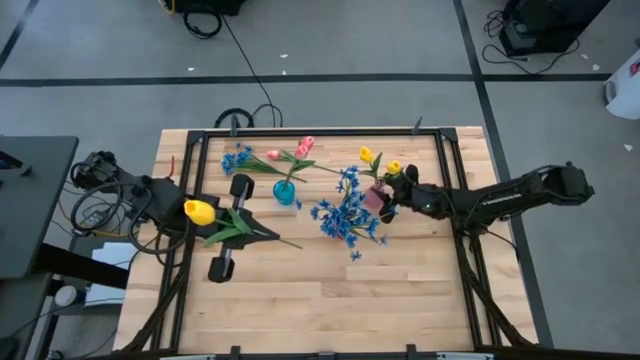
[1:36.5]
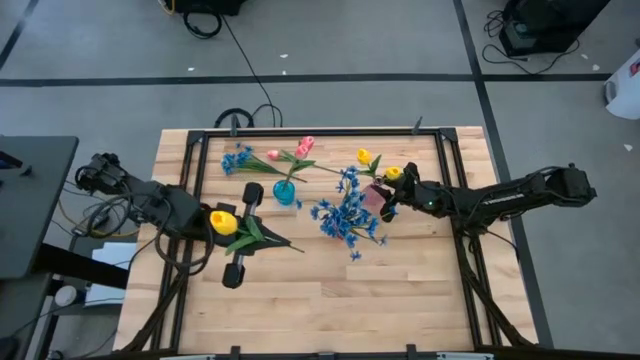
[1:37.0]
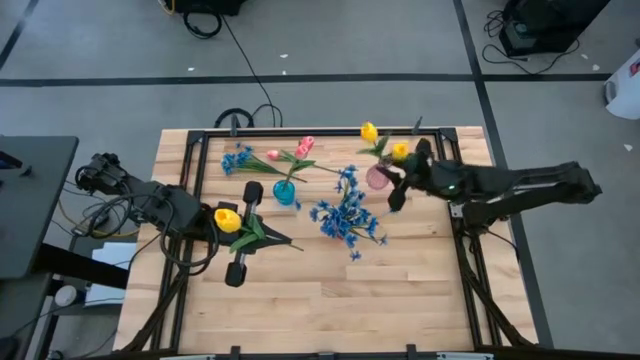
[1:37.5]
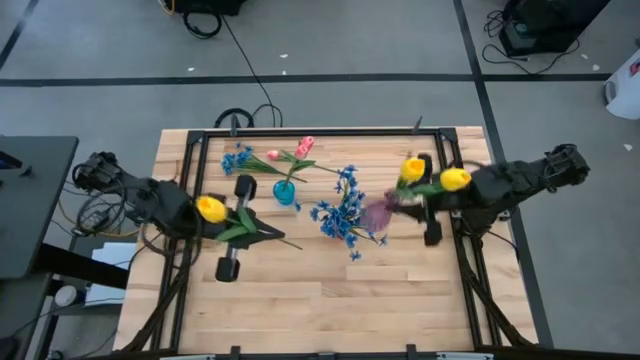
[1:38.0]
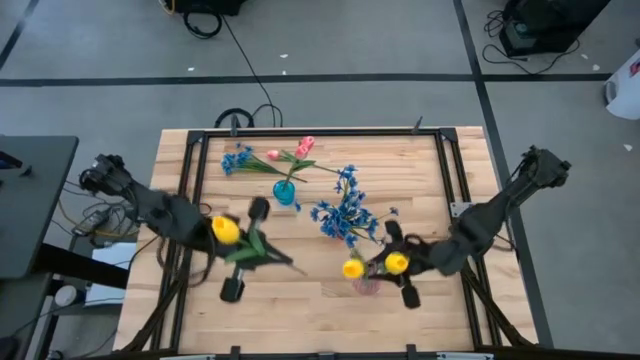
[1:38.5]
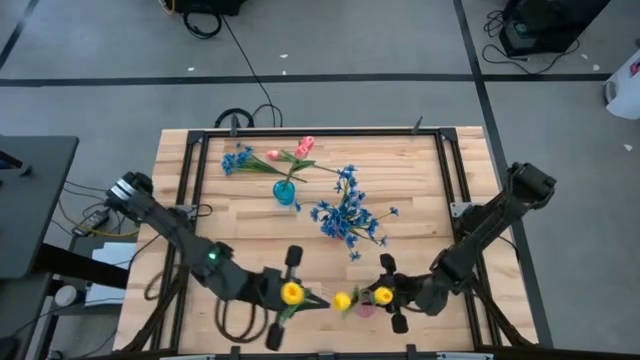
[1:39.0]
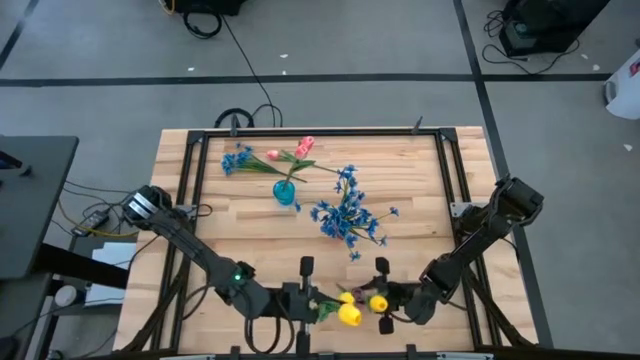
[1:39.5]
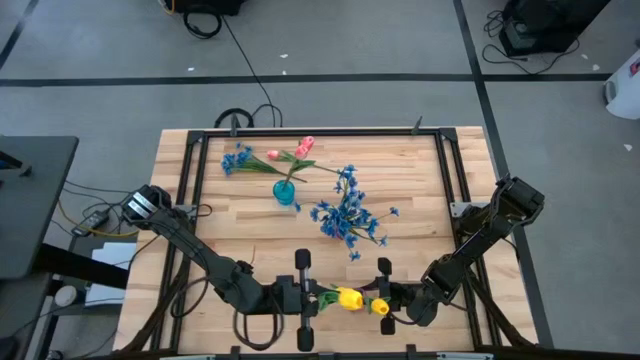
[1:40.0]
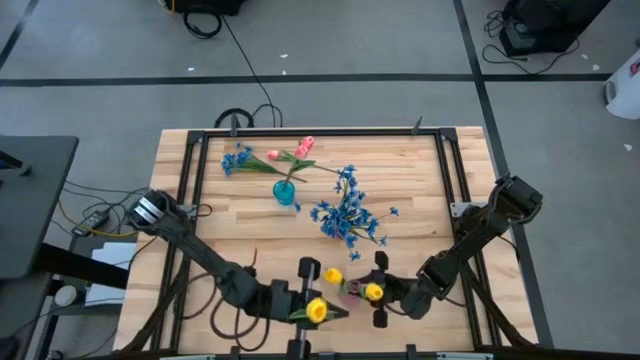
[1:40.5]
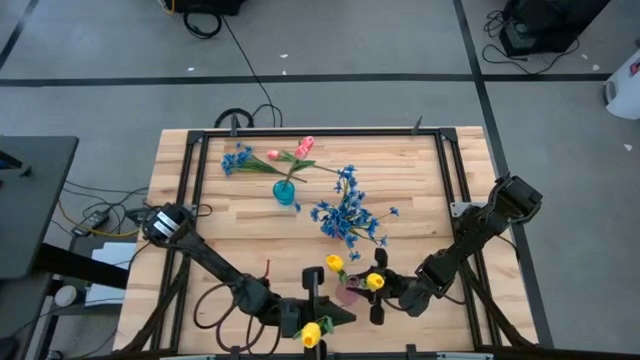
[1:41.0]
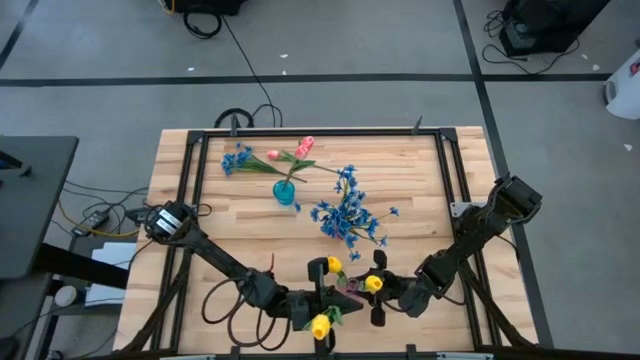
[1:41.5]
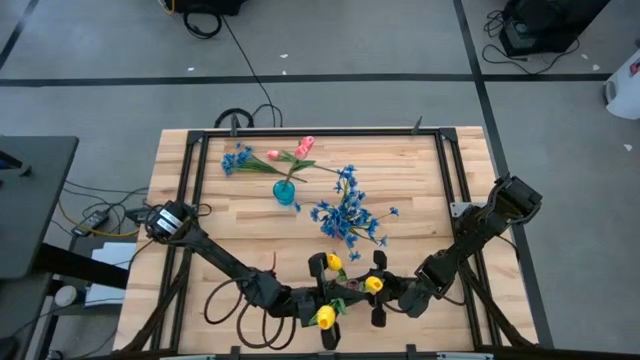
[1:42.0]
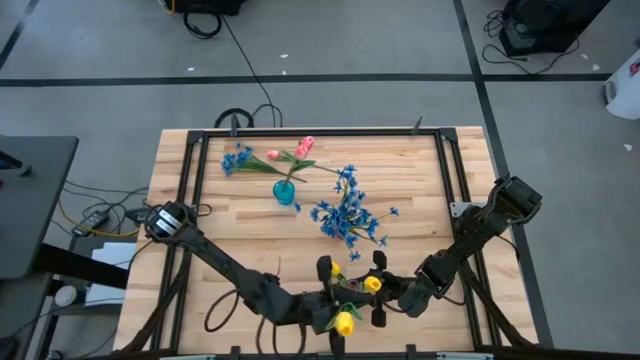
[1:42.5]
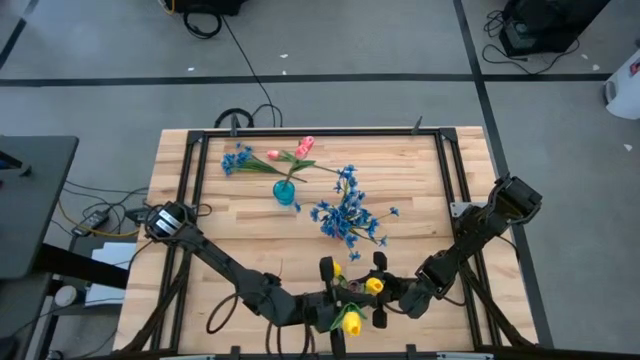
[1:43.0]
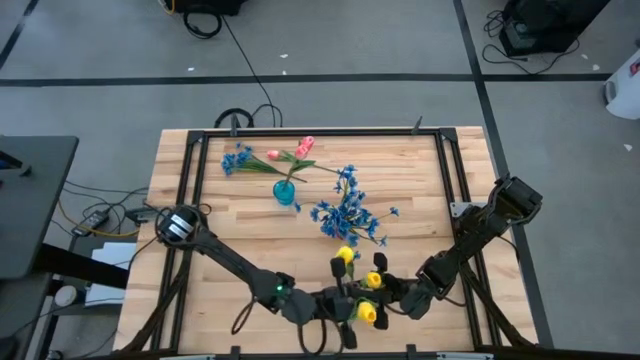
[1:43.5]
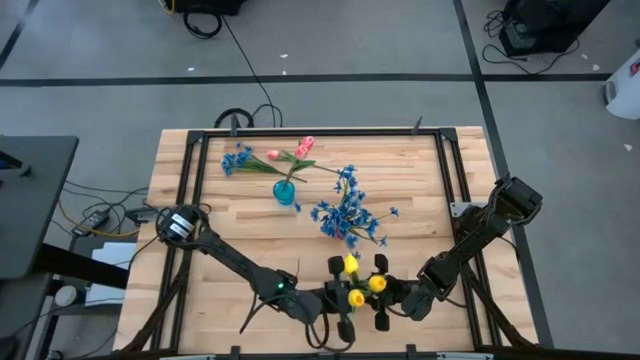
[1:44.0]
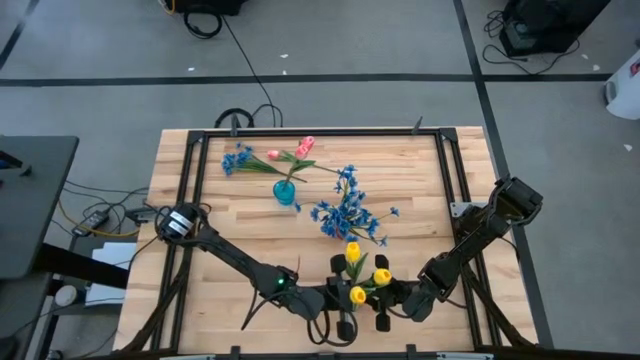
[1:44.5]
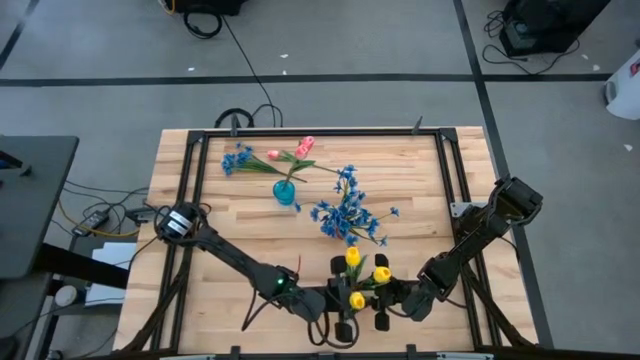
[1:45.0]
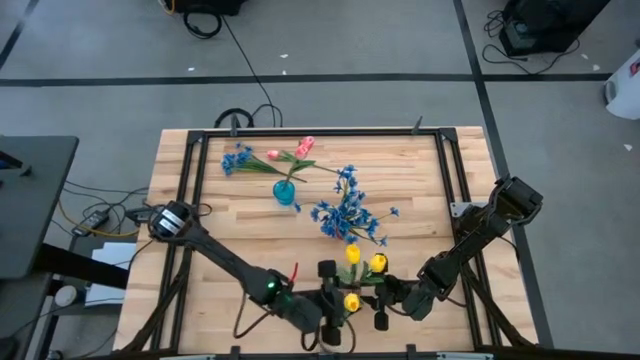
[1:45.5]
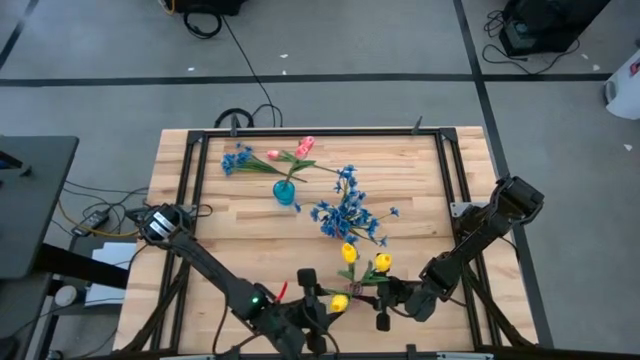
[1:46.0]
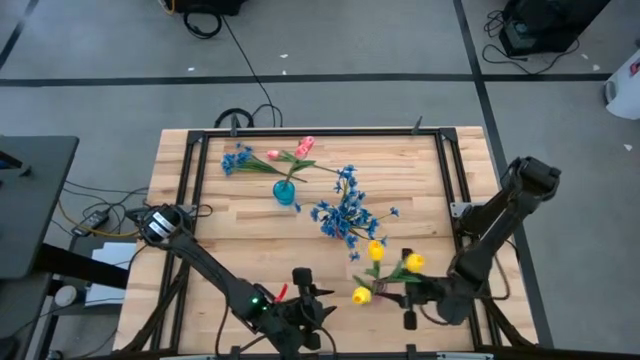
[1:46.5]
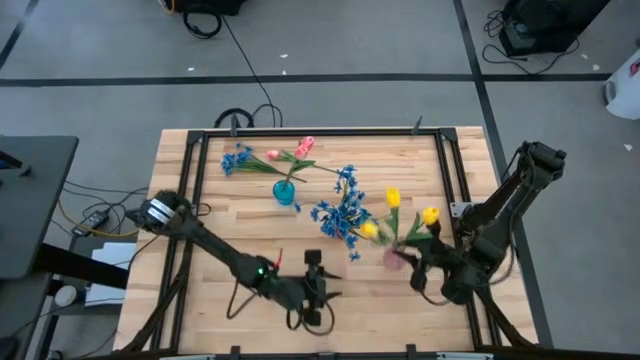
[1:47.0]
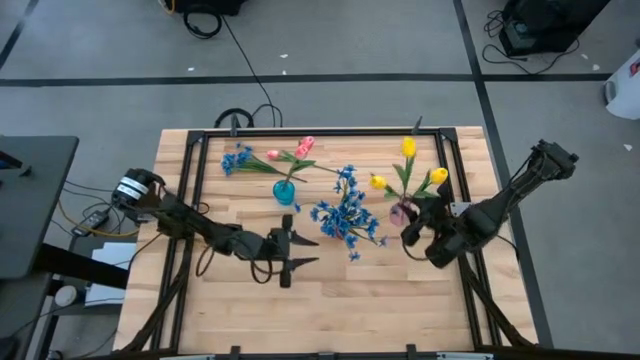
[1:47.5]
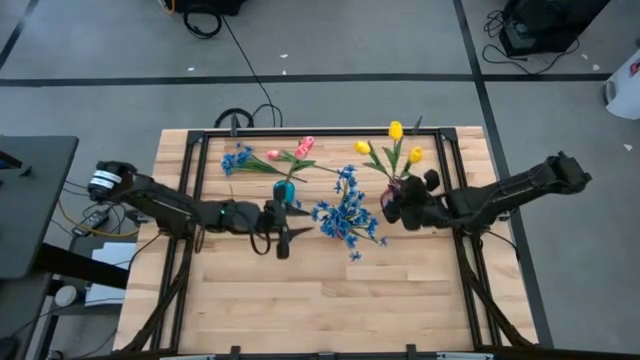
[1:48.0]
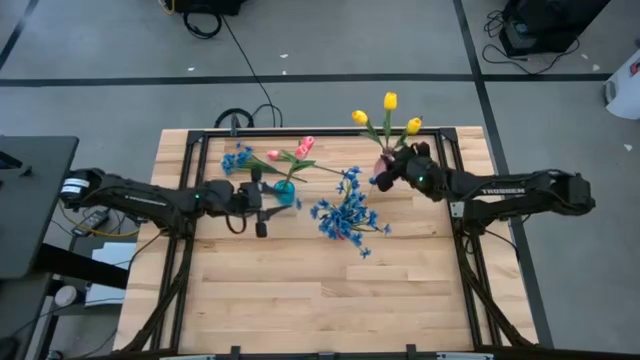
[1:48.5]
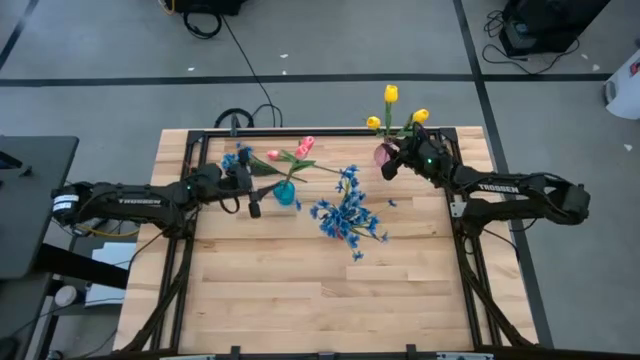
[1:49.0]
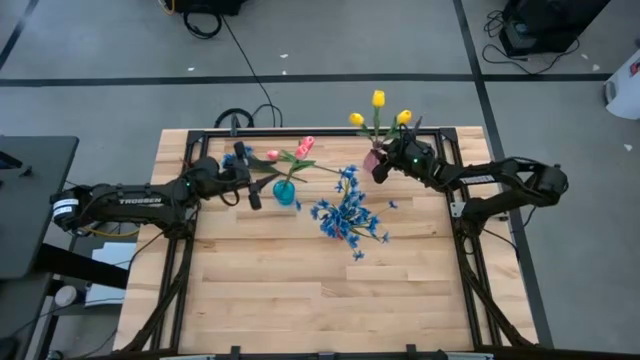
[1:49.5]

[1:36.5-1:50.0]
Task: Sort flowers into vase by color
Put the yellow flower into the pink vase

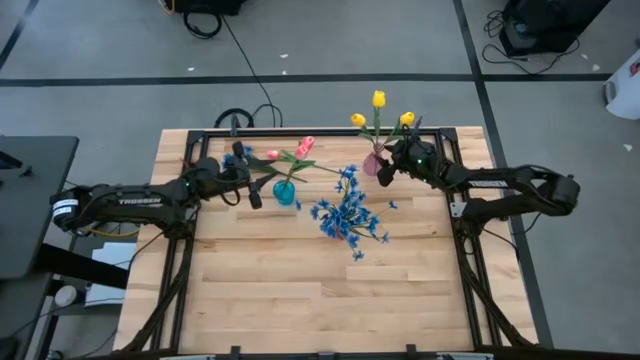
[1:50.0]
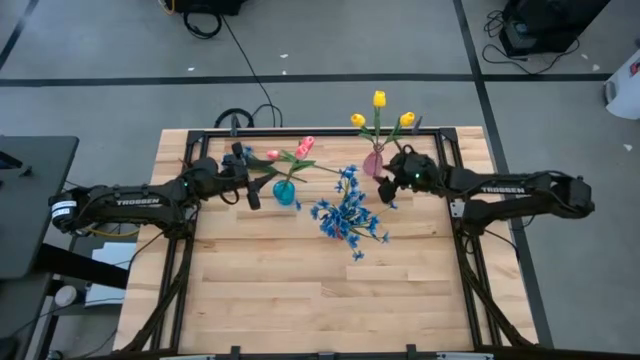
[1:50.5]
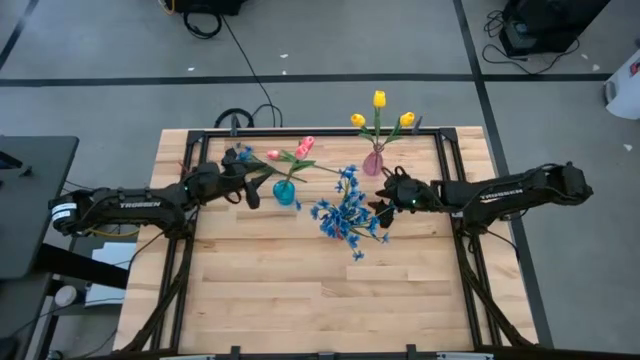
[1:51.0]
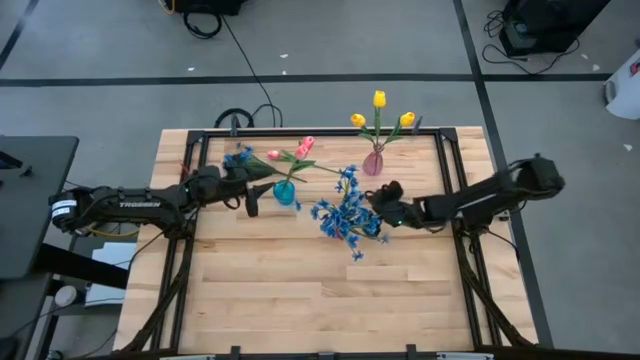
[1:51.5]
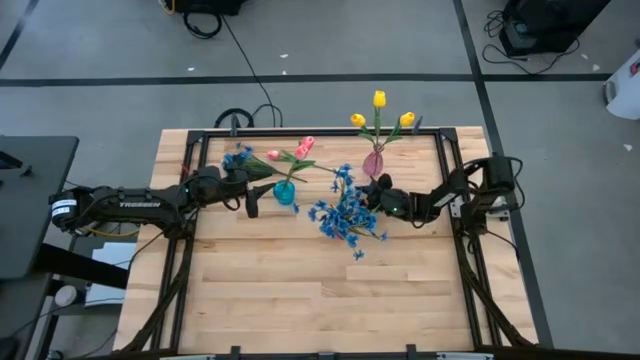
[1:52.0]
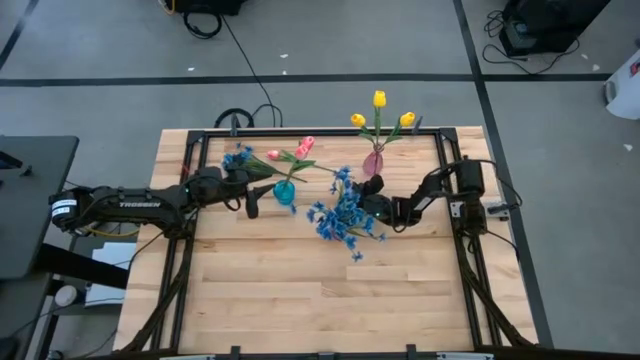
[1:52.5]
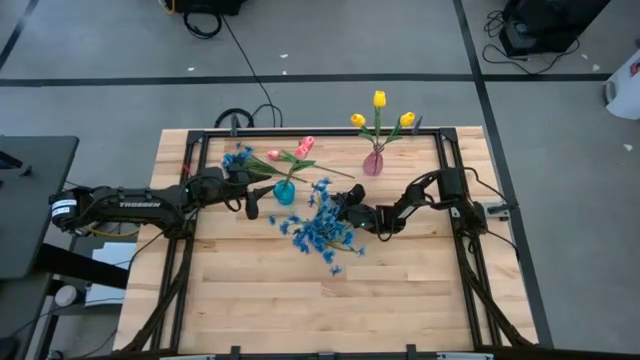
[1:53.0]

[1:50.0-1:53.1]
Adjust the red vase

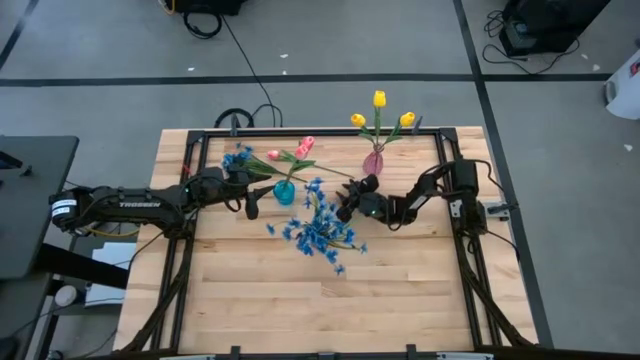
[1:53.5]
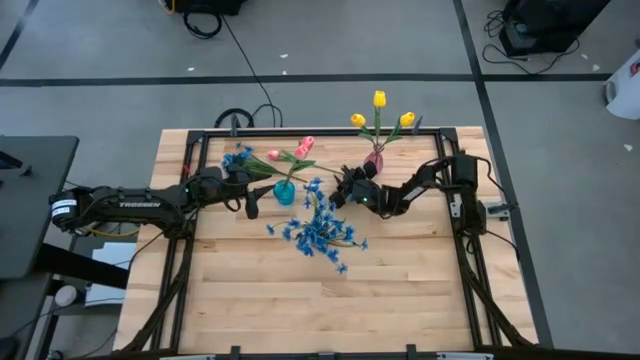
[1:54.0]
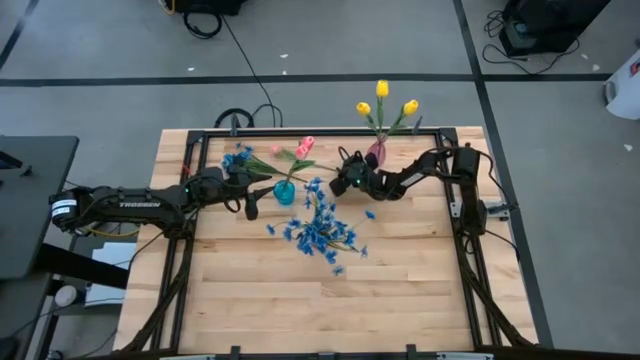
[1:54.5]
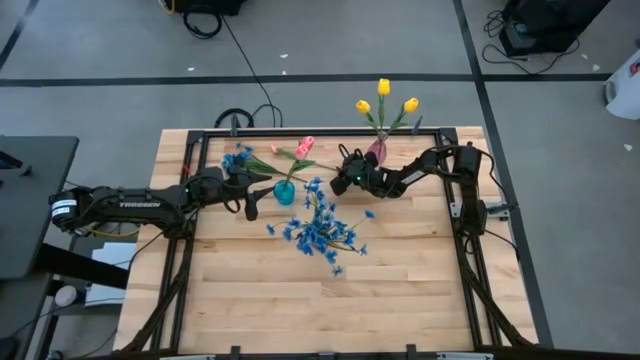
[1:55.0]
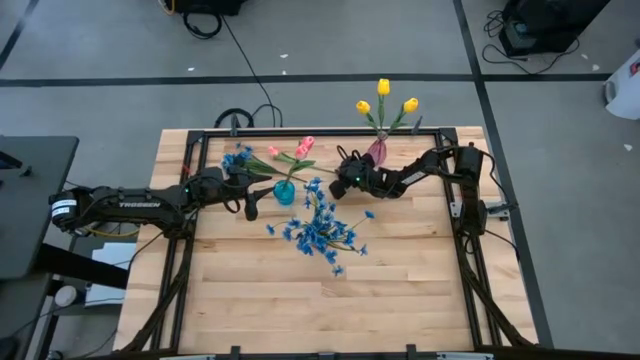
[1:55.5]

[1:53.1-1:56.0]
Put the pink flower into the blue vase

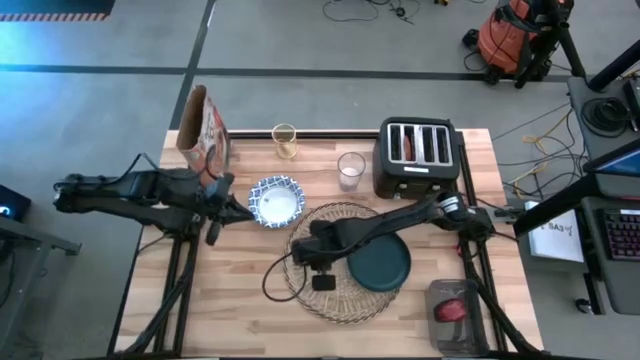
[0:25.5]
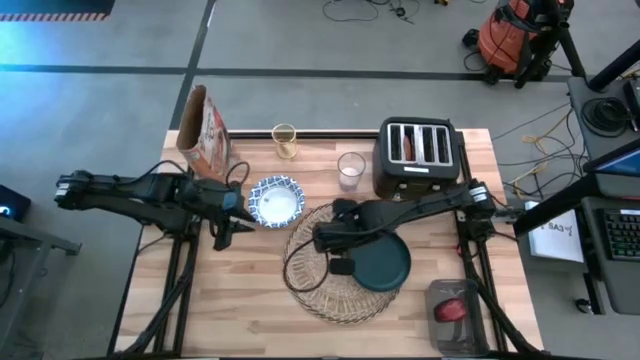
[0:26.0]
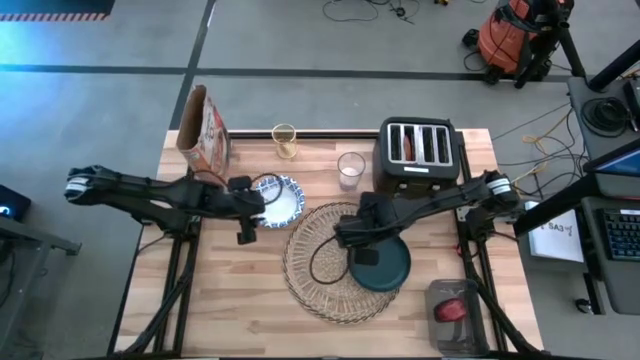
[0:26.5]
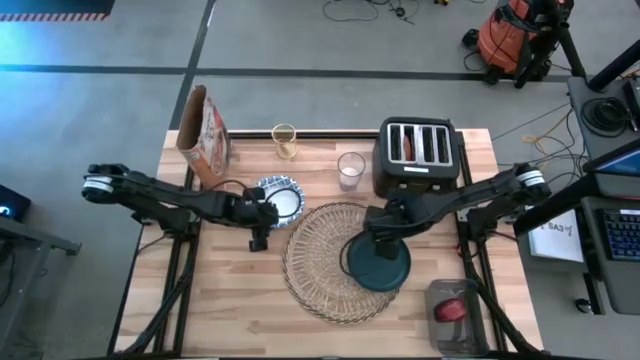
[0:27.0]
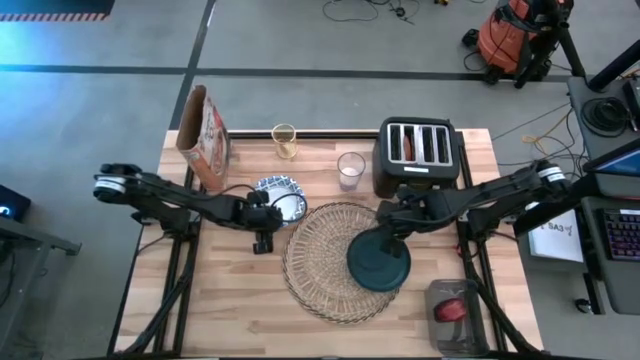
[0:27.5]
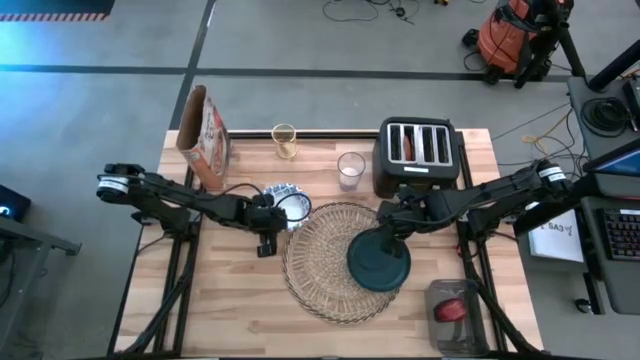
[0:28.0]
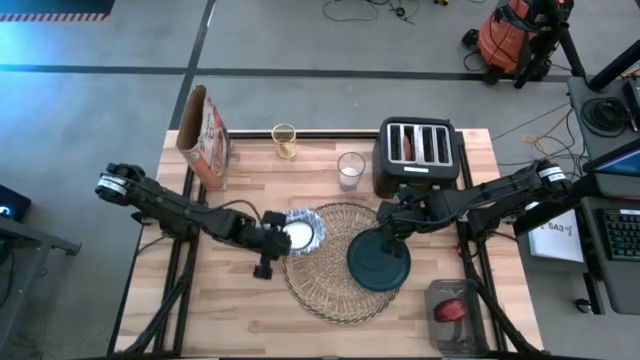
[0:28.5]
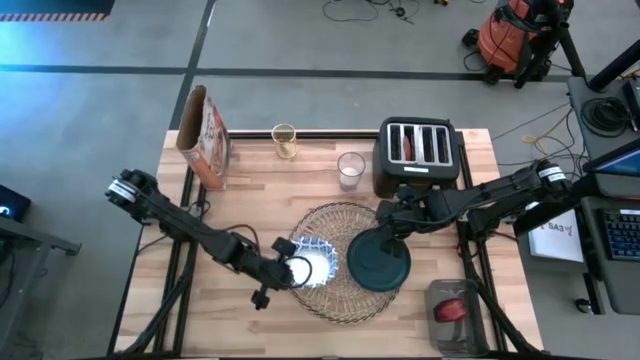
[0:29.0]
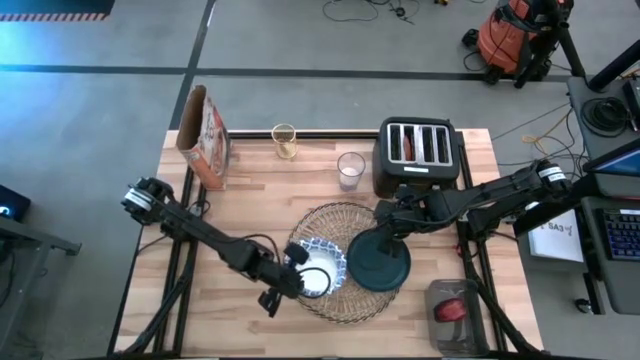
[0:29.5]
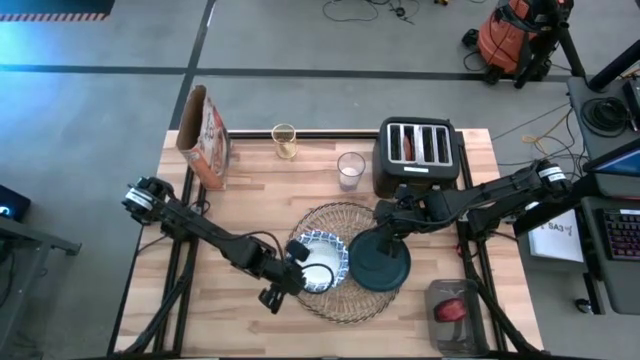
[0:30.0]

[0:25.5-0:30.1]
Task: Arrange a breakfast setting
Put the white patterned bowl to the left of the black plate on the brown table mat
